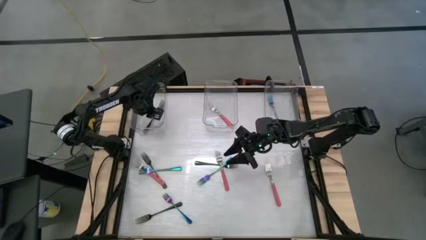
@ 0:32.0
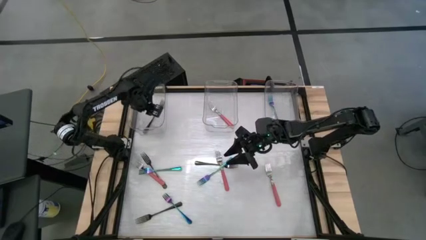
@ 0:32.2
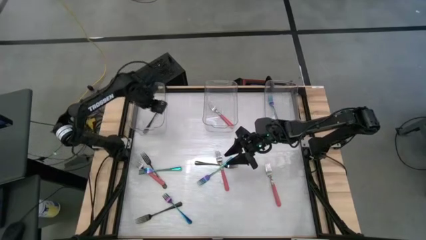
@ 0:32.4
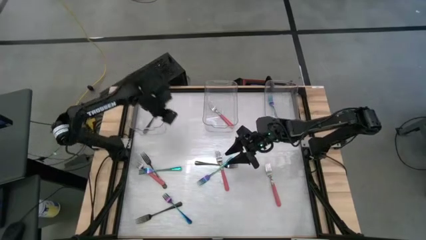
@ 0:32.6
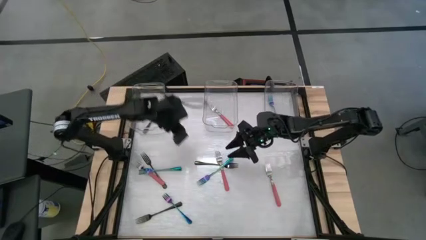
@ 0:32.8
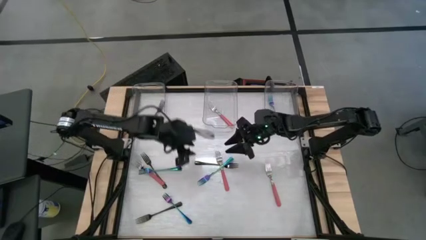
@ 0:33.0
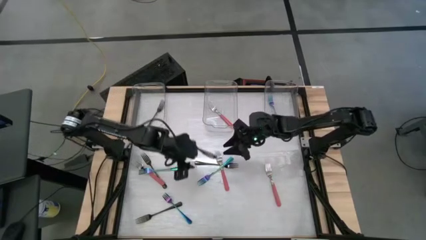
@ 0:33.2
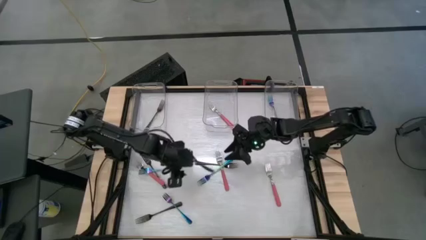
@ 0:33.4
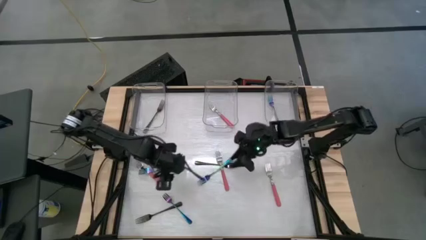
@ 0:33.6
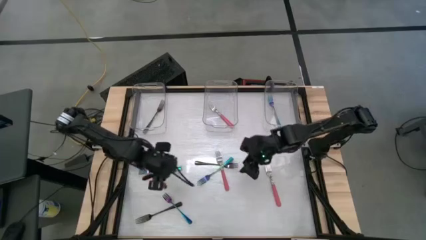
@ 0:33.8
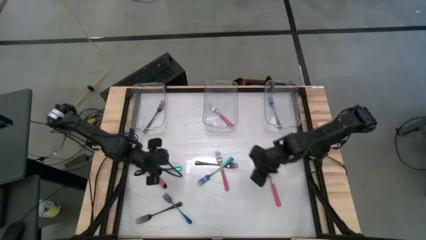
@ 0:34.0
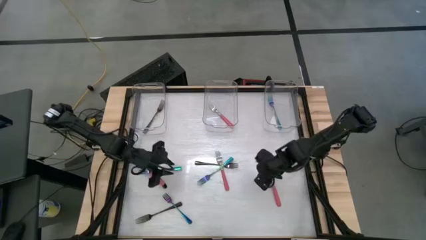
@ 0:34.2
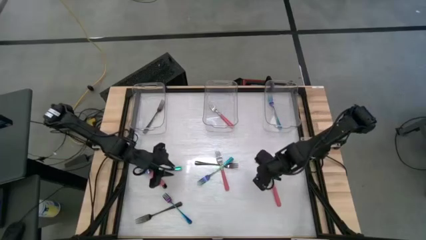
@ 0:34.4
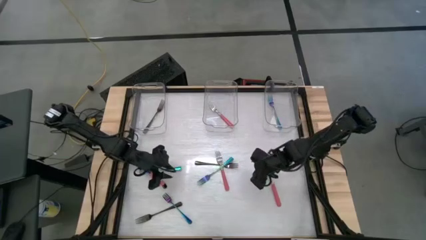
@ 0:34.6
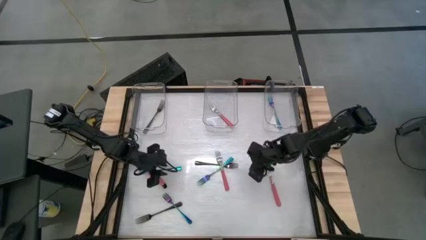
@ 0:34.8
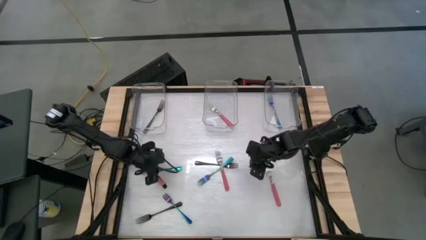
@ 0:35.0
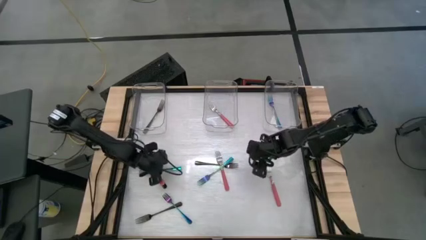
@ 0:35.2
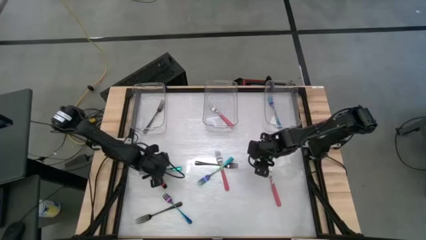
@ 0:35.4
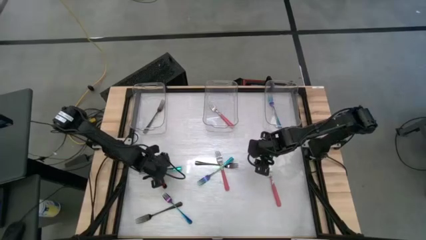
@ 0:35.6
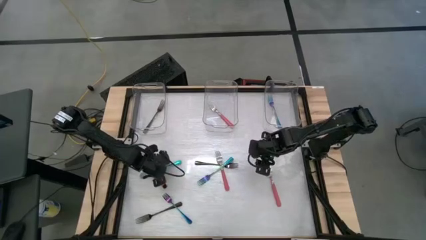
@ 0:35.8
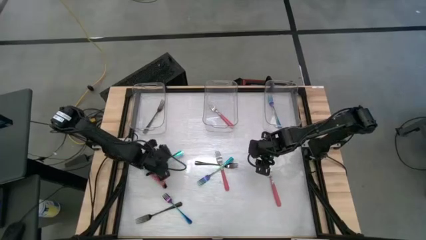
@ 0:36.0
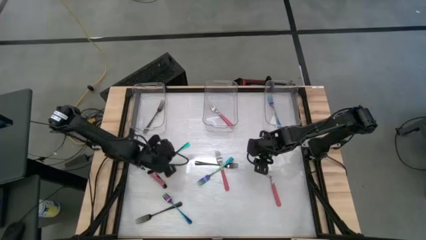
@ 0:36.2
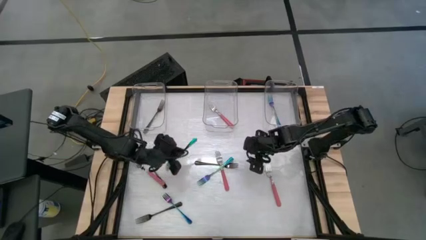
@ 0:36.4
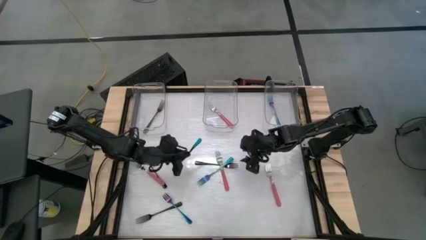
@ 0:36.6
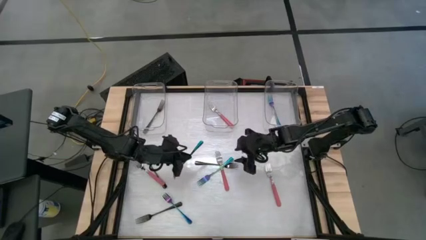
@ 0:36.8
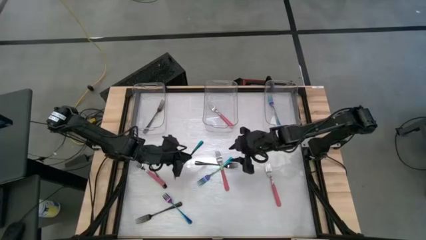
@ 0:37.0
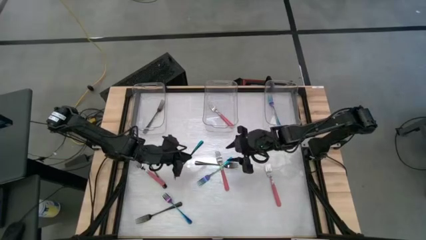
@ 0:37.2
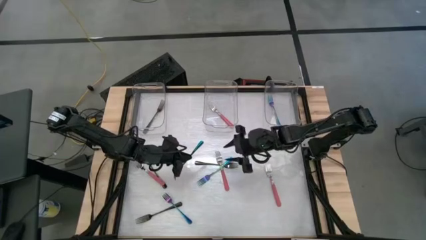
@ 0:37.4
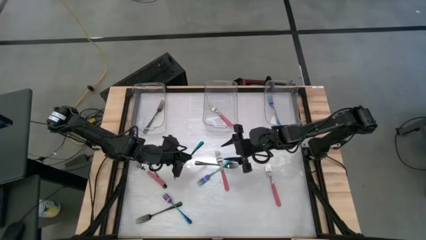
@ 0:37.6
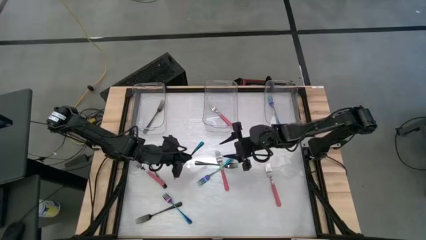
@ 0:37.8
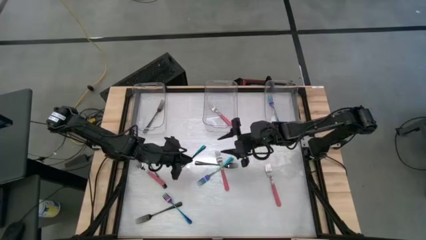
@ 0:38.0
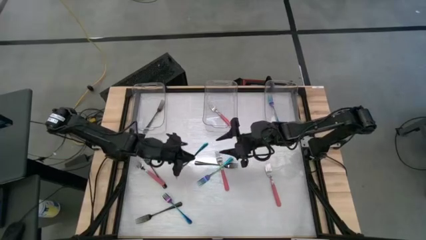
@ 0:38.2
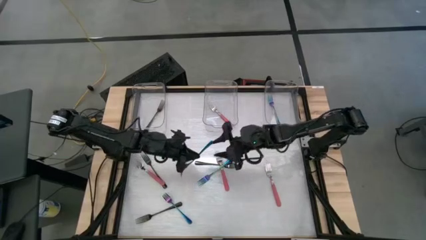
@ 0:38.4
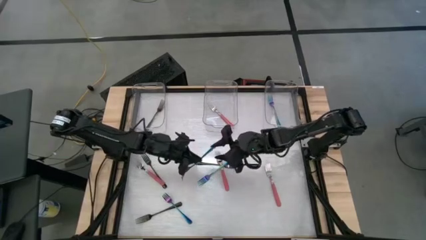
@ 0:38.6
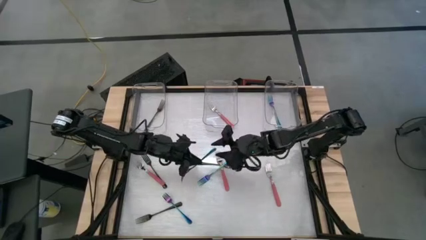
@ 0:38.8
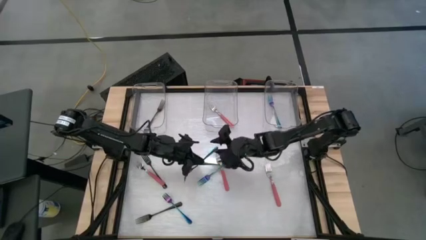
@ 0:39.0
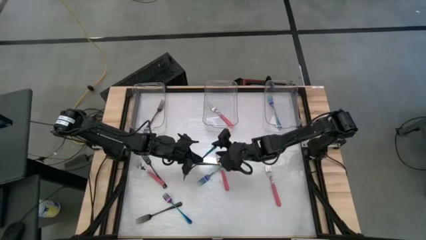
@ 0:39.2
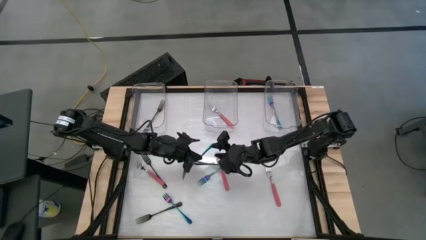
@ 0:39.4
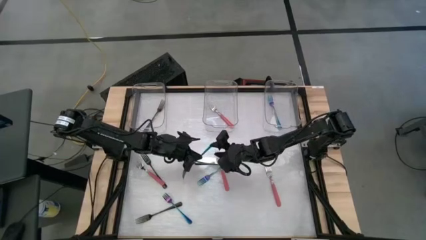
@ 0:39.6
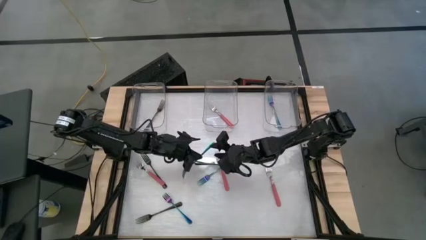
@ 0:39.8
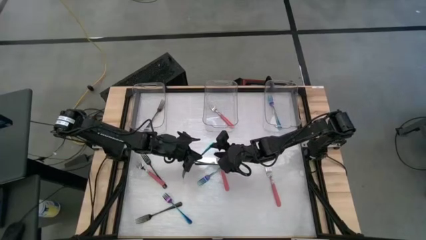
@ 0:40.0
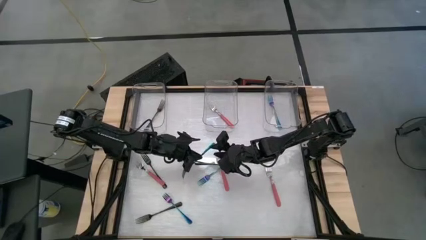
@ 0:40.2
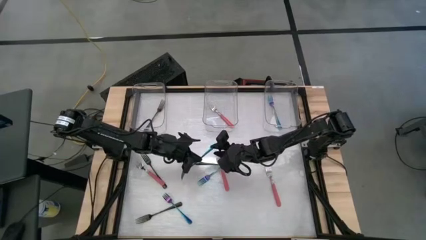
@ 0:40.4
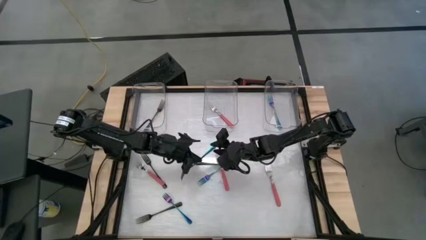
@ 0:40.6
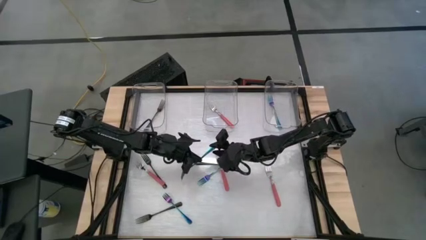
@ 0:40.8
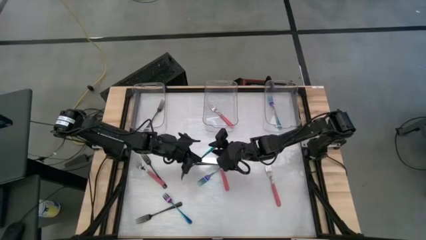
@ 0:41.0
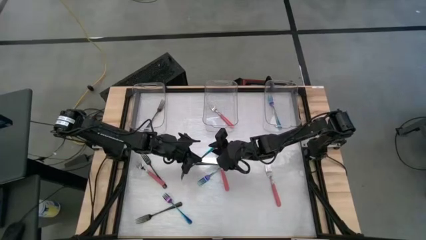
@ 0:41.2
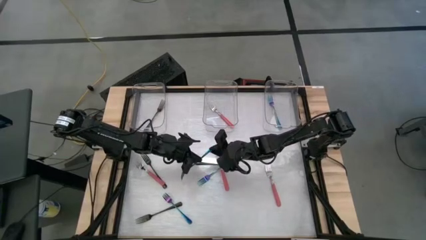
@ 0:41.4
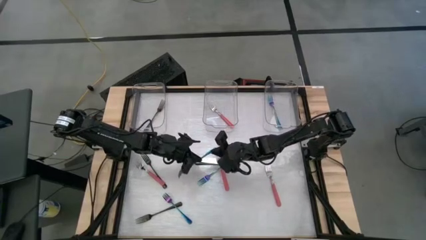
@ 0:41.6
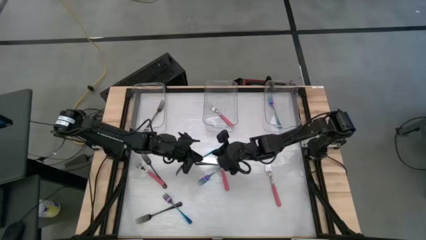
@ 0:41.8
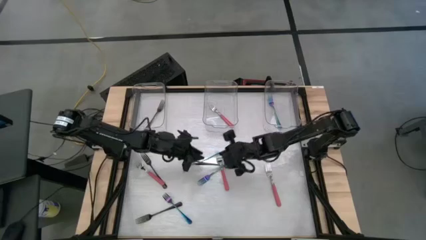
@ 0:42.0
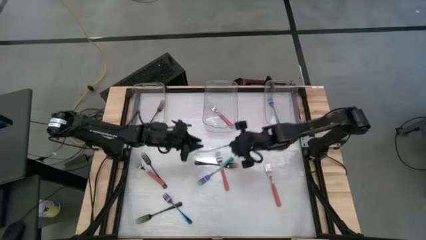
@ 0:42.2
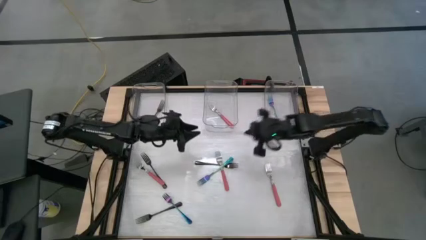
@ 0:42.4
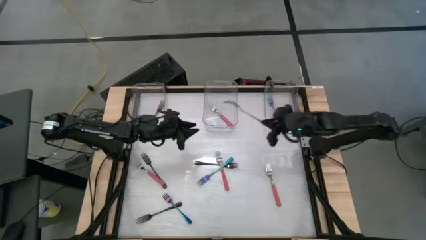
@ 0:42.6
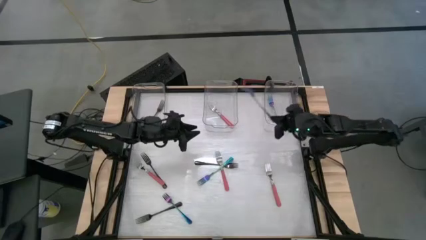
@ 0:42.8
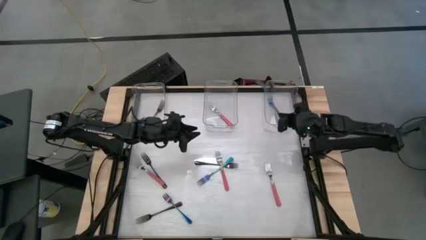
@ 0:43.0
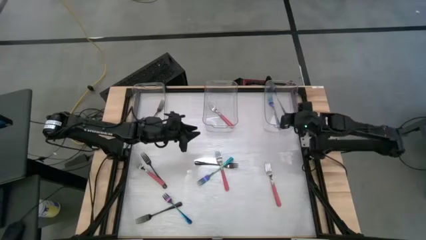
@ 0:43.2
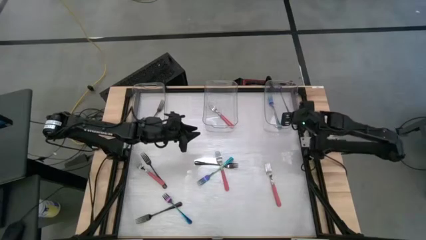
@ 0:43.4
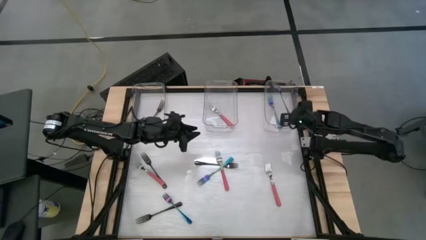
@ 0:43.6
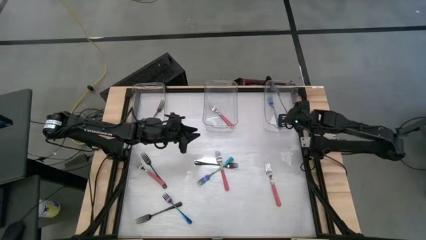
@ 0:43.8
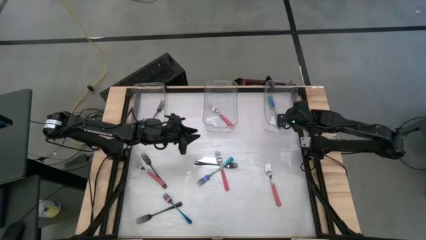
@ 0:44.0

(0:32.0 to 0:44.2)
Task: Sort silverware by color (type)
Put the top left iridescent fork into the right transparent bin
